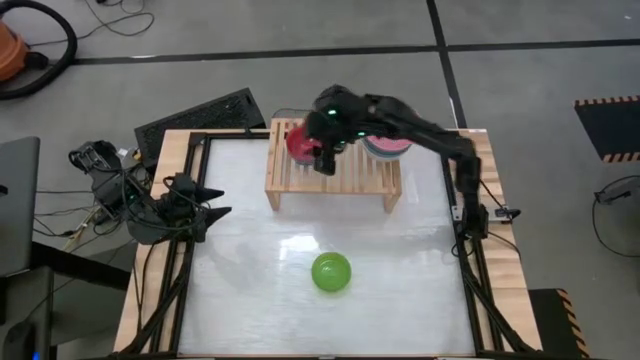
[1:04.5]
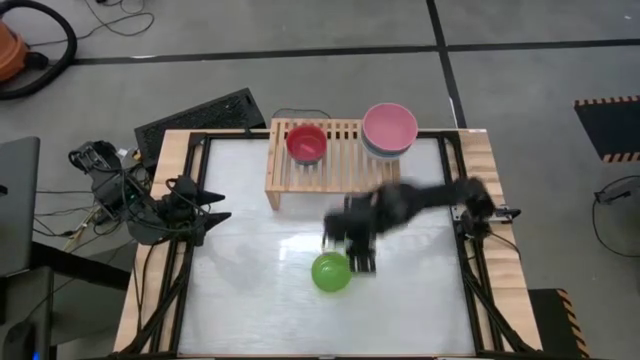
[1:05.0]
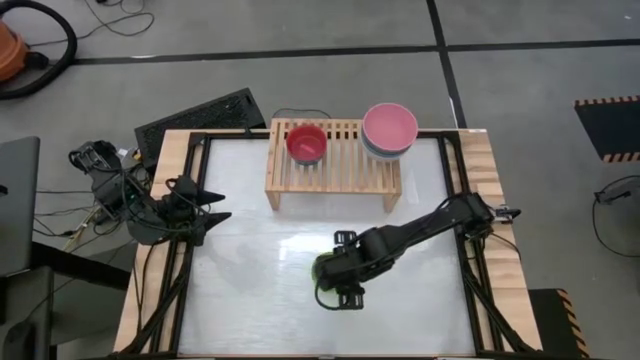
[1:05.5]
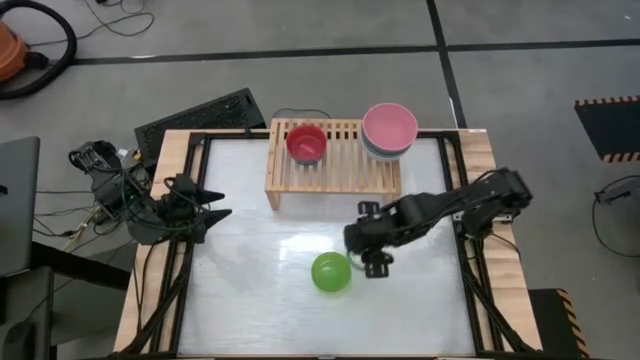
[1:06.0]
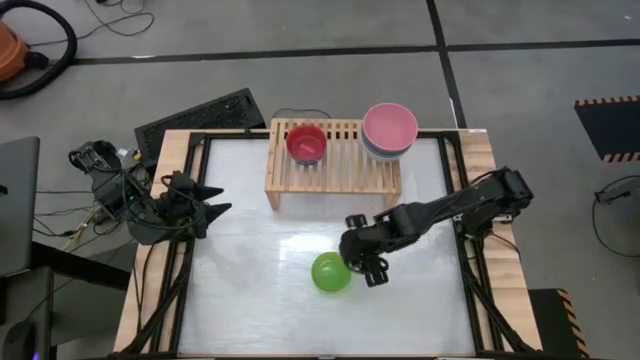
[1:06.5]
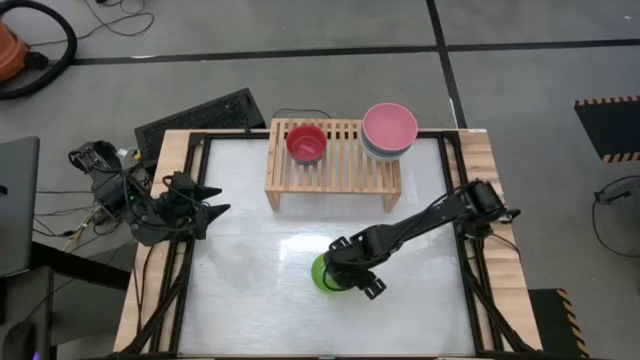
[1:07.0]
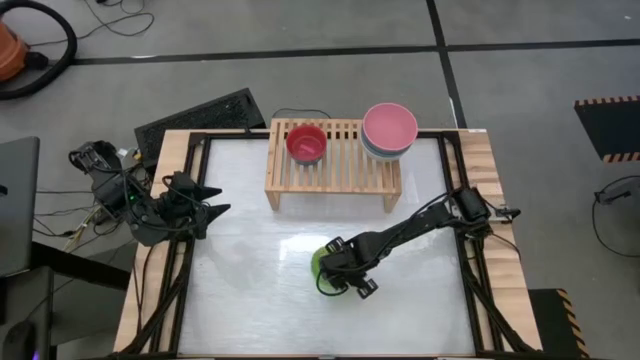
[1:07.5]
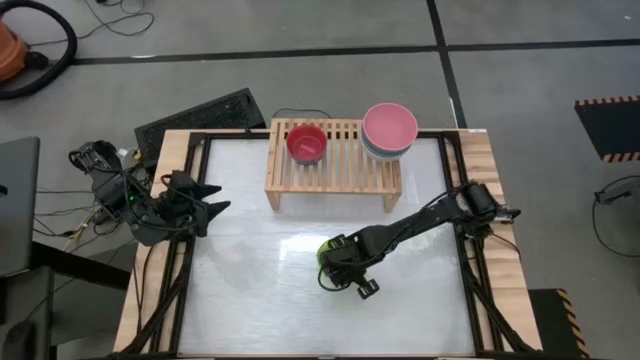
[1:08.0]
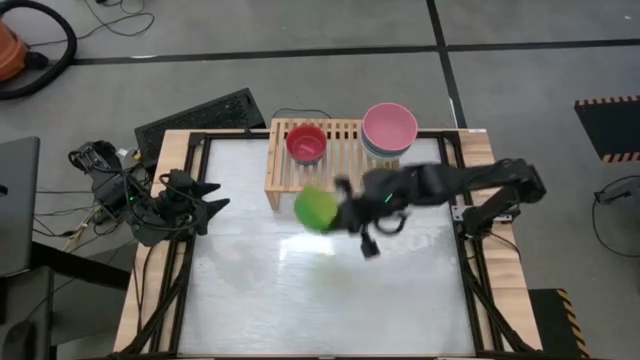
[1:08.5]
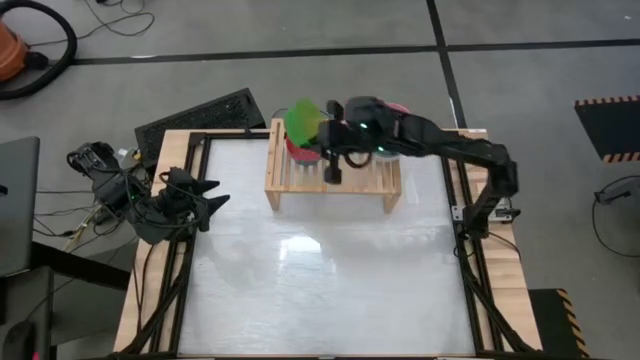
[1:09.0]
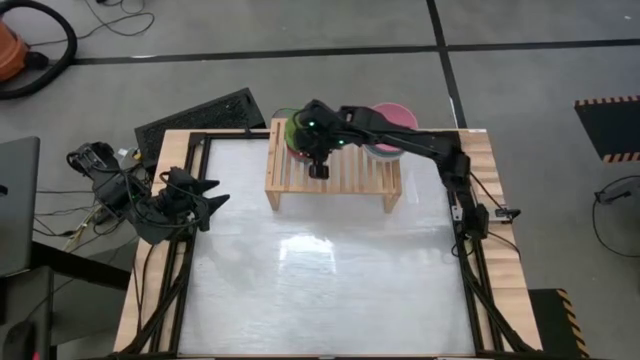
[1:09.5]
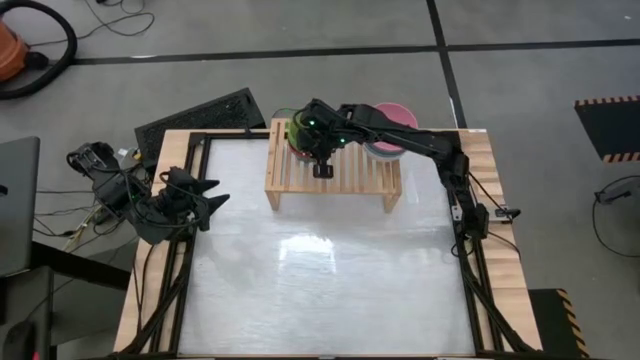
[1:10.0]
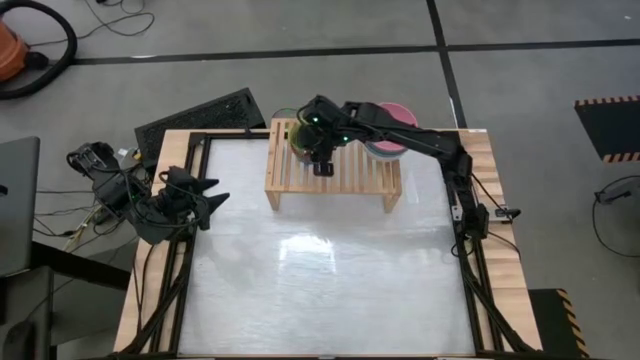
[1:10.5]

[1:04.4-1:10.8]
Task: Place and stack bowls onto a shelf
Stack the light green bowl on top of the light pink bowl on the shelf

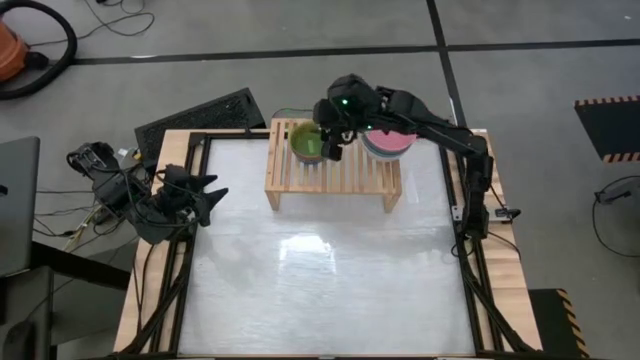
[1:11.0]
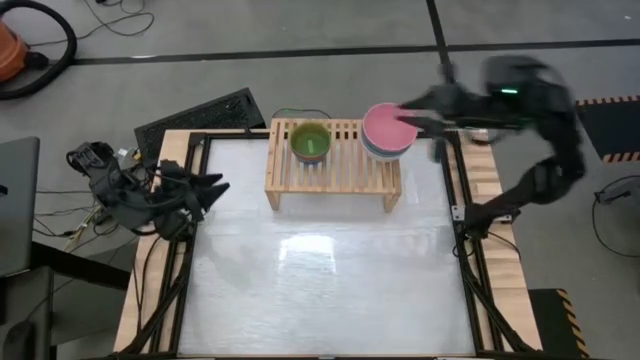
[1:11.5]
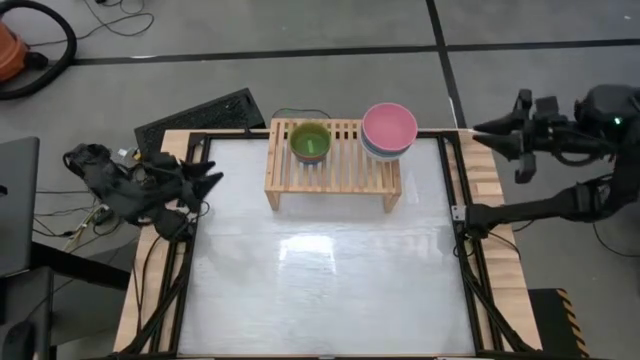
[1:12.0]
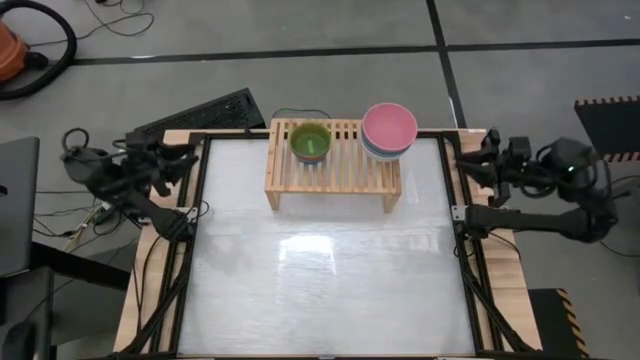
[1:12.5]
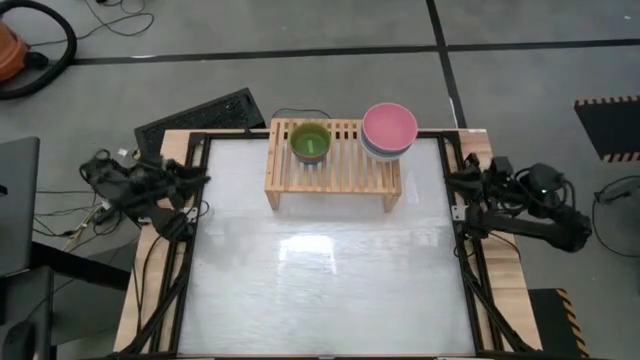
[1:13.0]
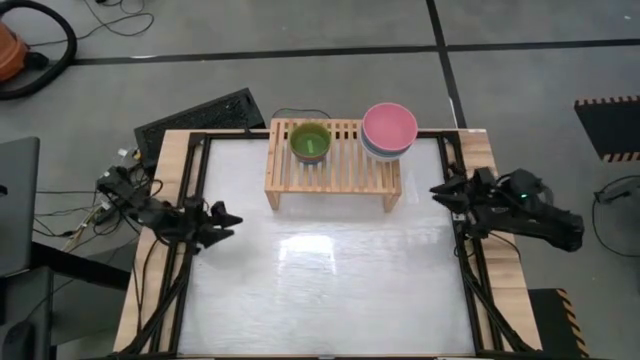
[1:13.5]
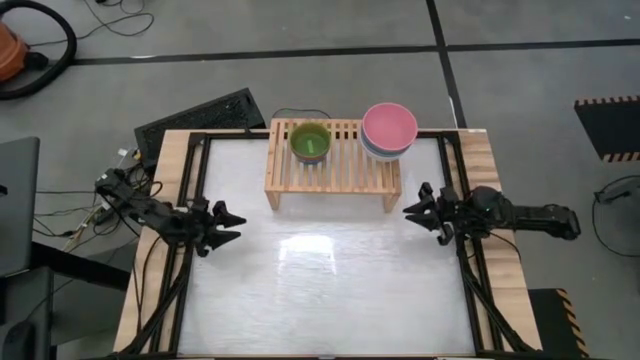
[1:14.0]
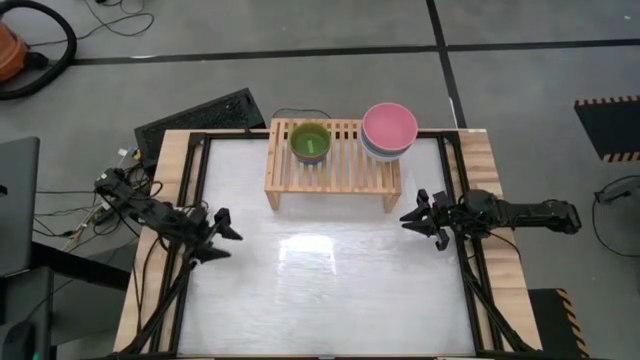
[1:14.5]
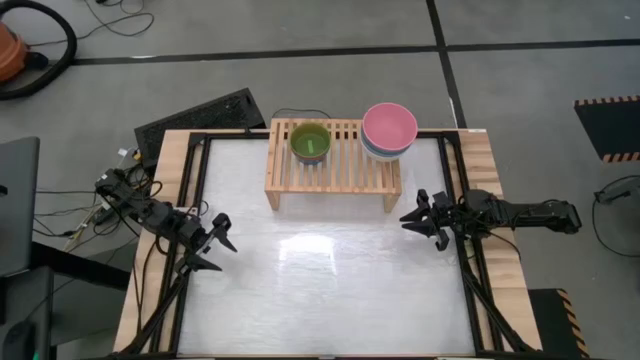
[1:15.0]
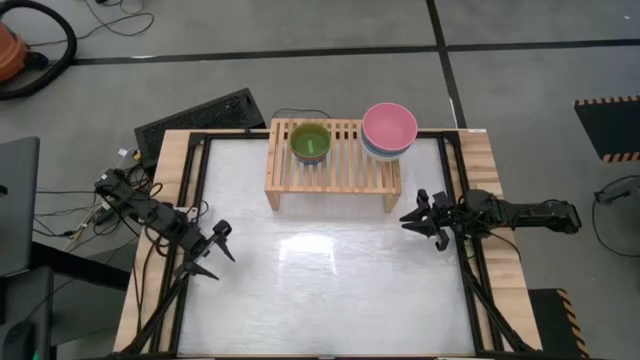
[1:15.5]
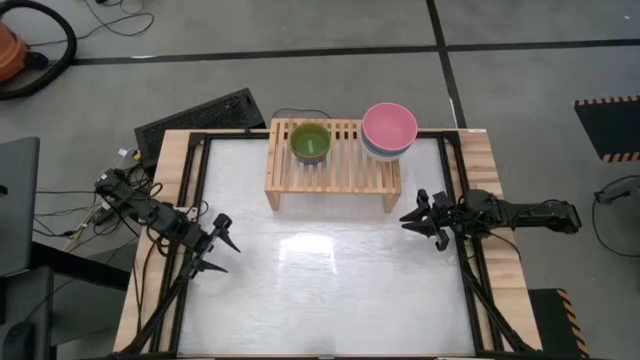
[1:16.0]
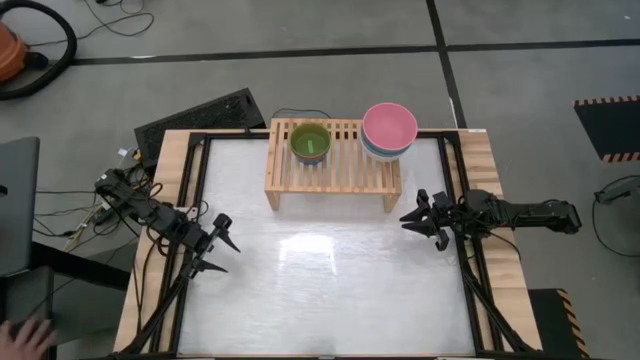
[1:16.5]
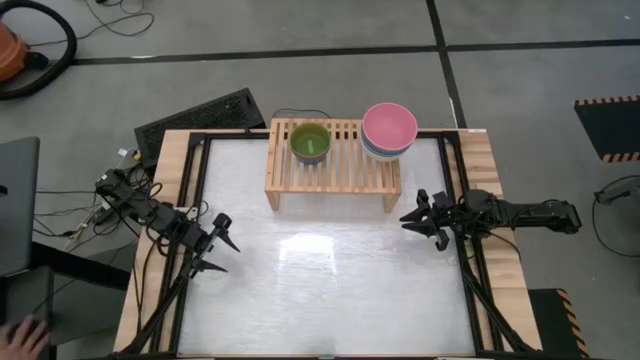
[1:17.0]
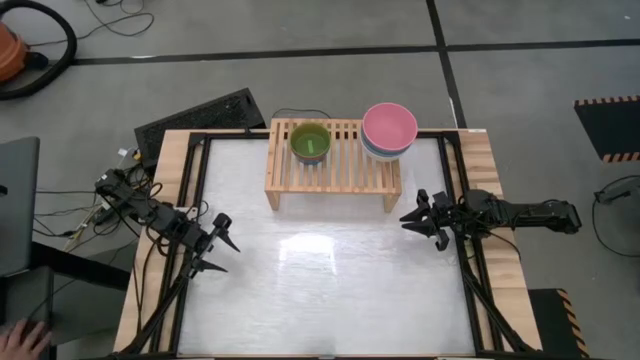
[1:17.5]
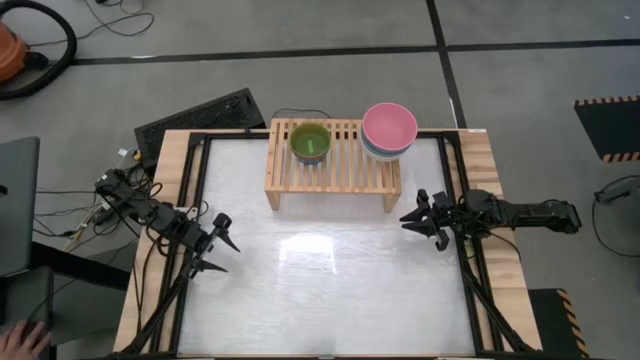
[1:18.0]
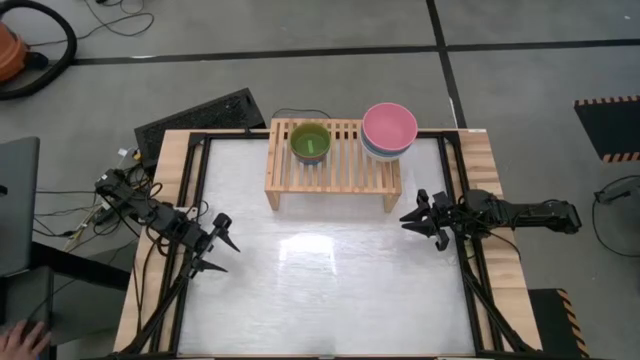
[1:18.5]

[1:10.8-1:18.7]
Return to Home Position

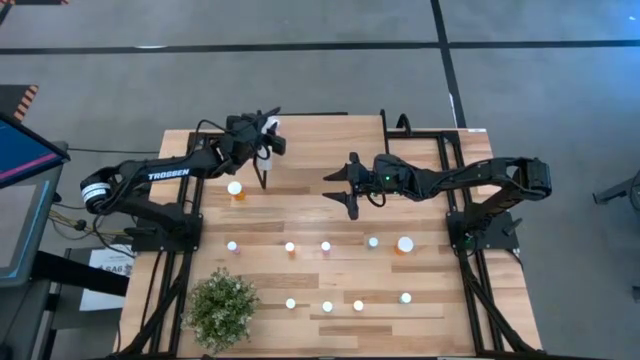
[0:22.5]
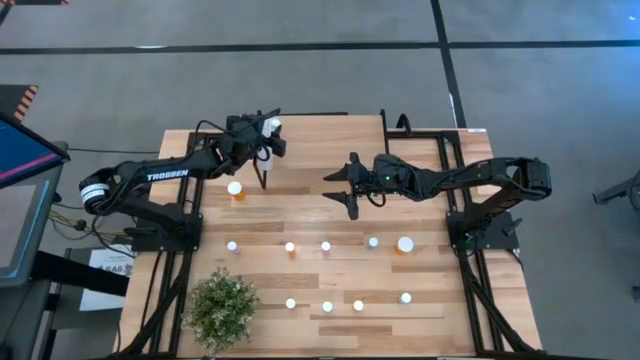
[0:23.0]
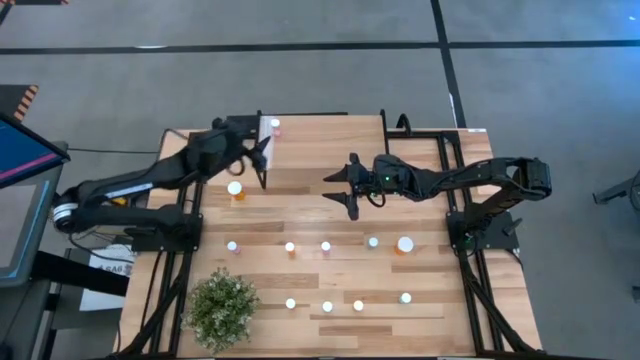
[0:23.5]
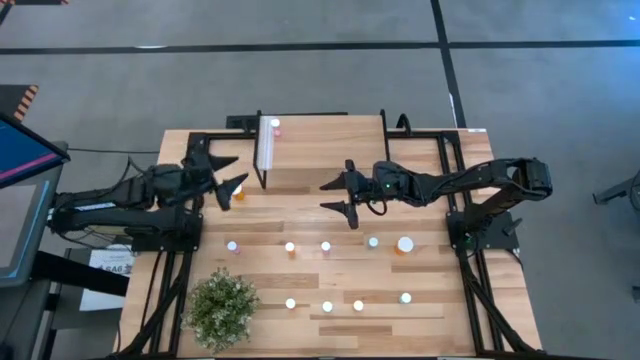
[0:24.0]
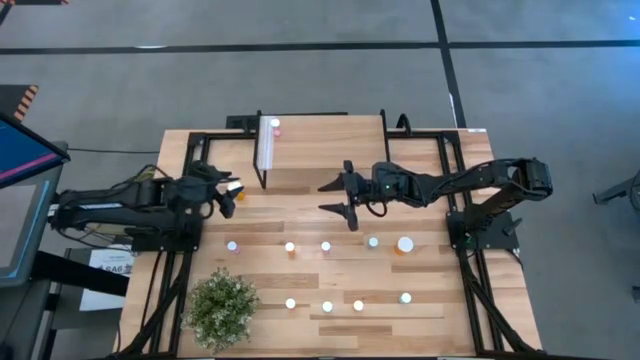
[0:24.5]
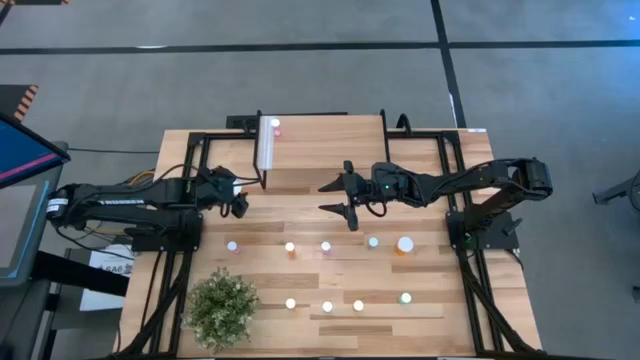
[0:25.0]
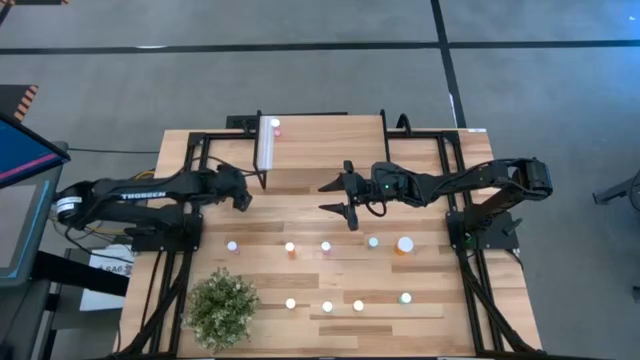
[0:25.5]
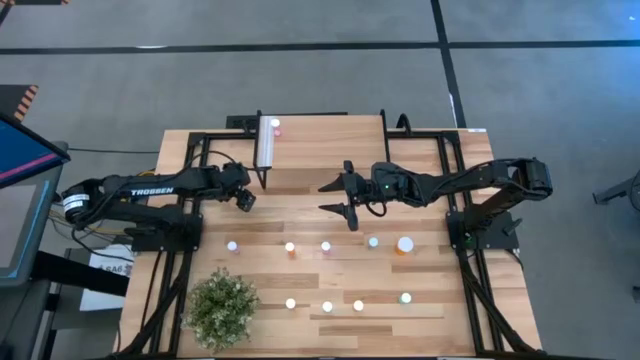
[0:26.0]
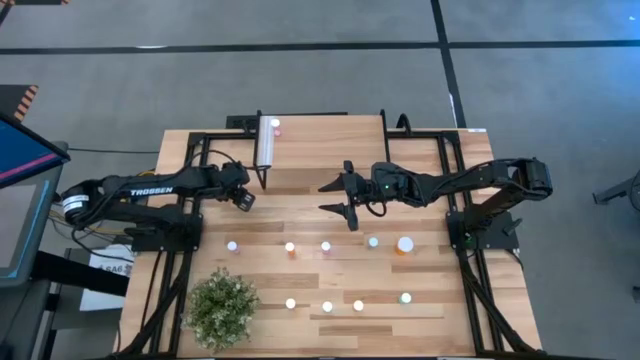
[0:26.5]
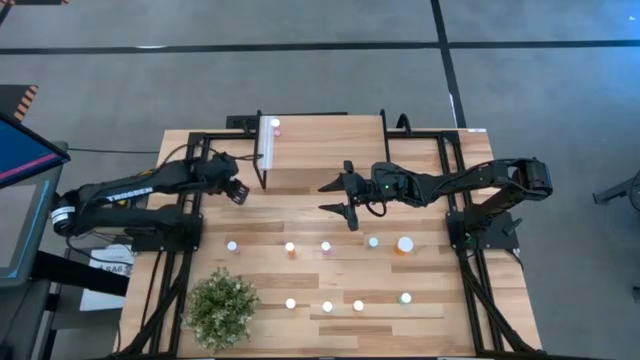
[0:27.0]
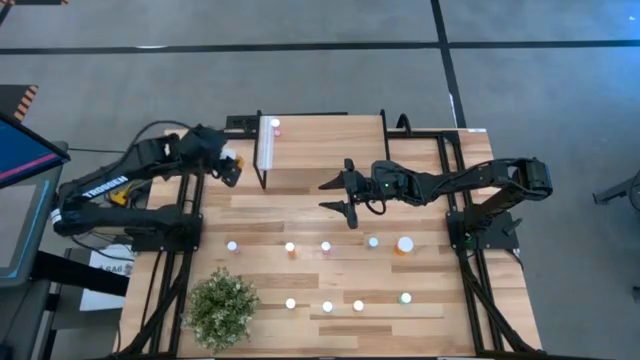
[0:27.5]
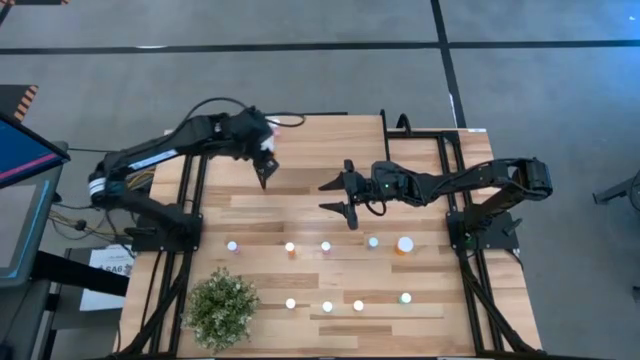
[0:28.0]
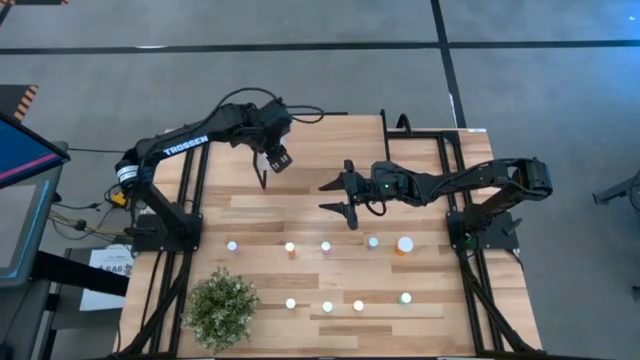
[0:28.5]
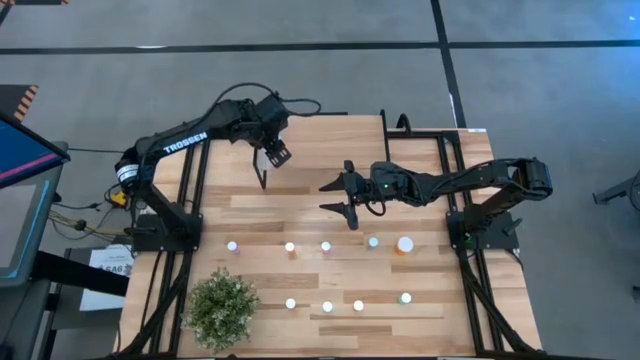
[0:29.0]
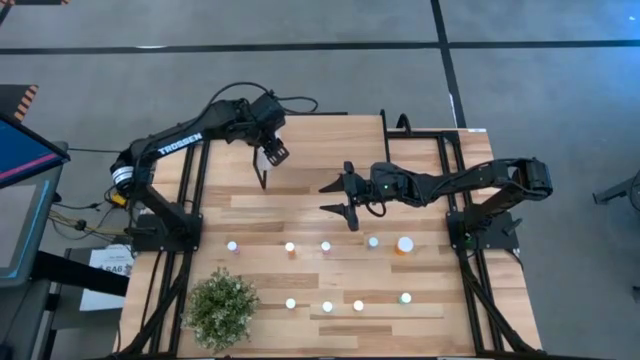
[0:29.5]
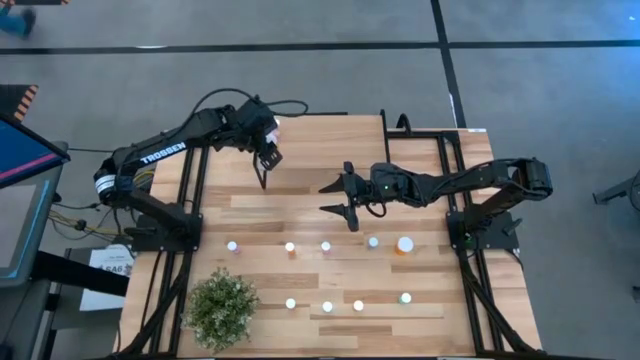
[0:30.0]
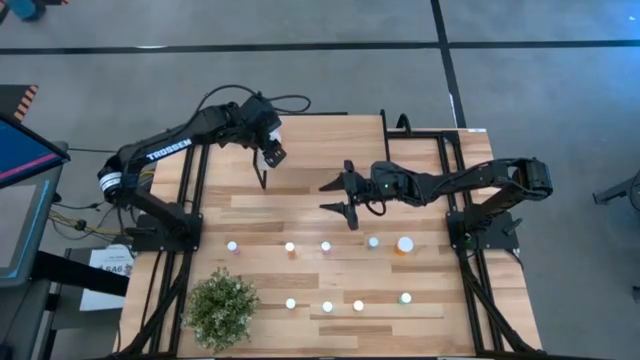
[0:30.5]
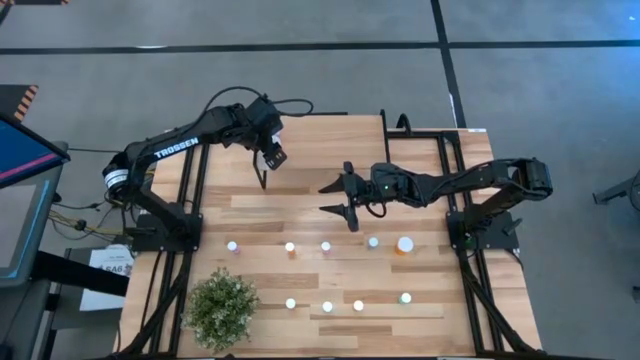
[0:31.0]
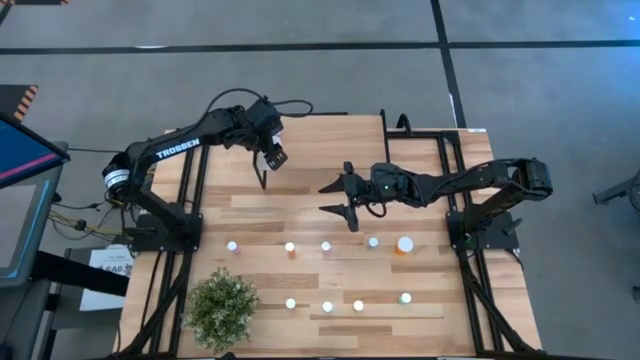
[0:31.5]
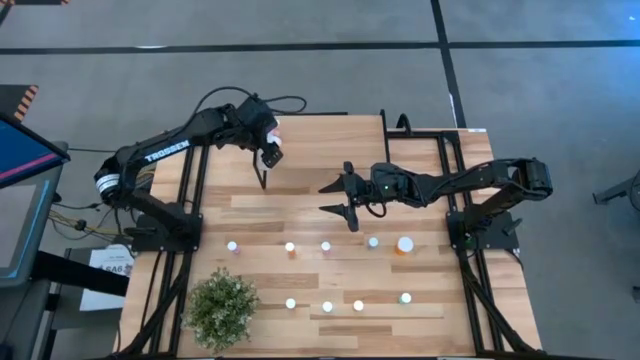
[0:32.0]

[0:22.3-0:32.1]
Task: Pick and place medicine bottles onto shelf by color
Put the large orange pill bottle on the shelf
